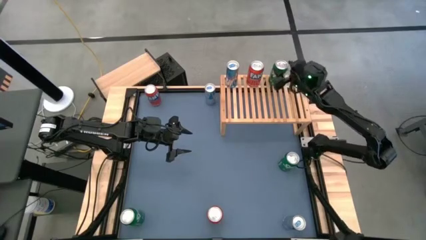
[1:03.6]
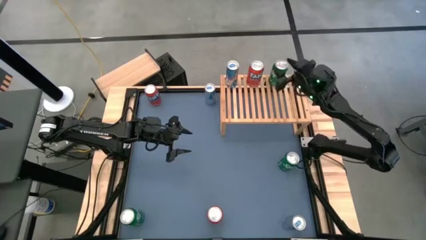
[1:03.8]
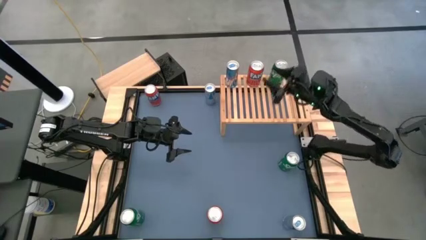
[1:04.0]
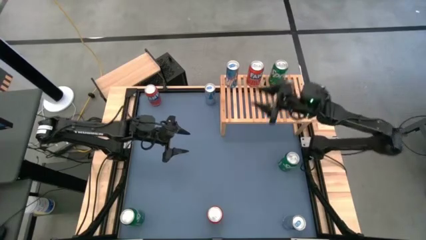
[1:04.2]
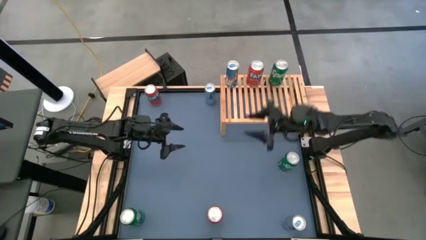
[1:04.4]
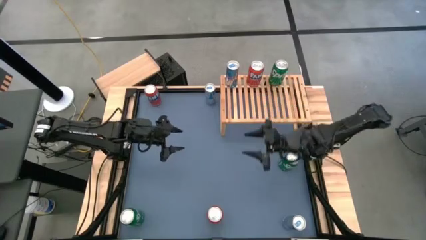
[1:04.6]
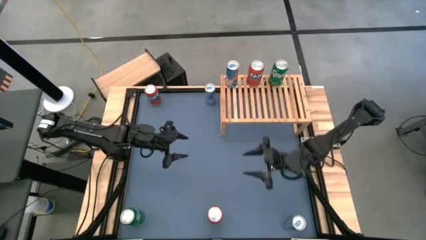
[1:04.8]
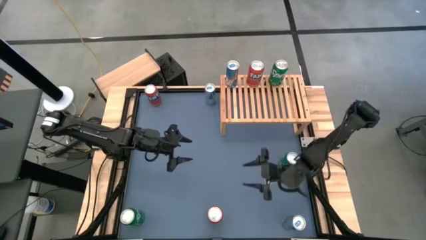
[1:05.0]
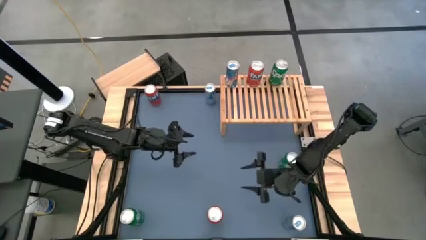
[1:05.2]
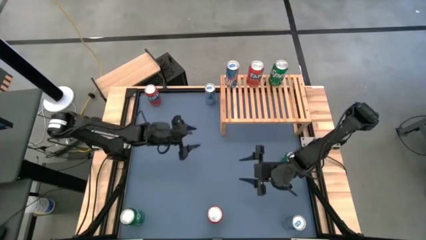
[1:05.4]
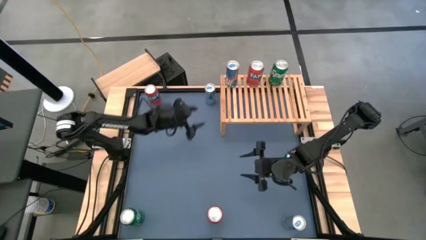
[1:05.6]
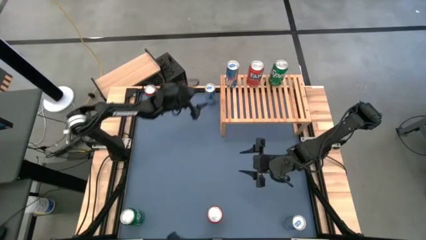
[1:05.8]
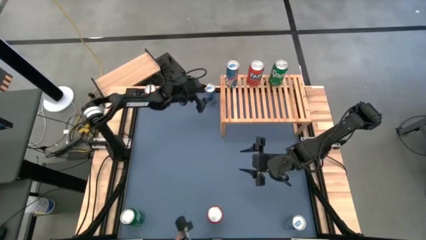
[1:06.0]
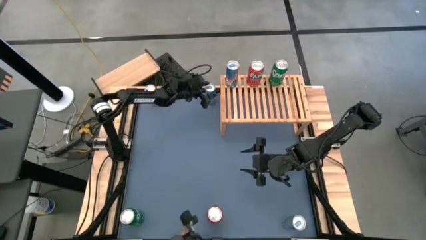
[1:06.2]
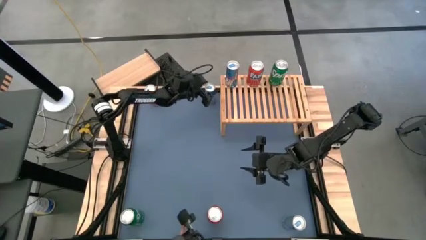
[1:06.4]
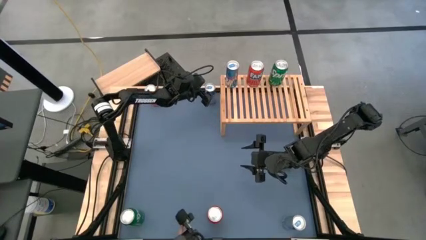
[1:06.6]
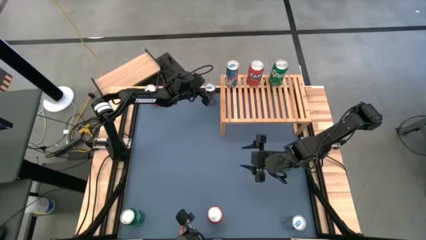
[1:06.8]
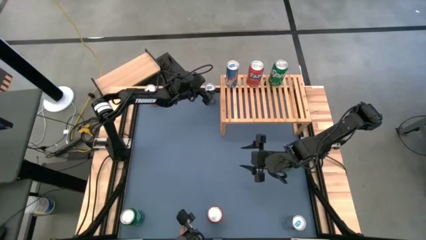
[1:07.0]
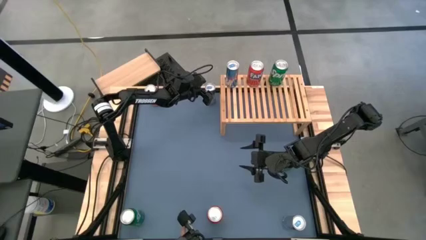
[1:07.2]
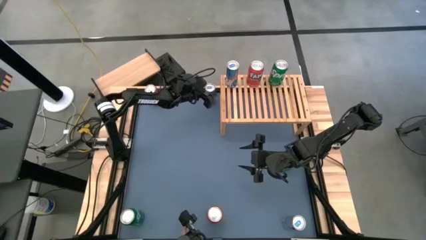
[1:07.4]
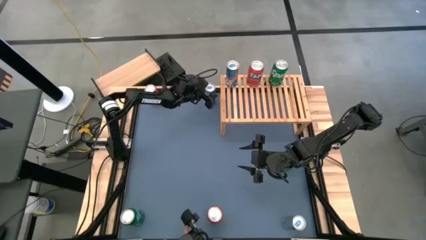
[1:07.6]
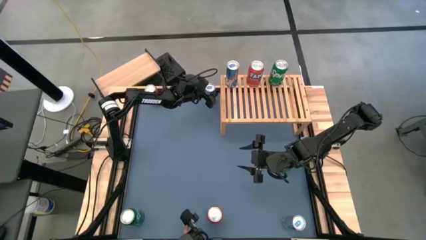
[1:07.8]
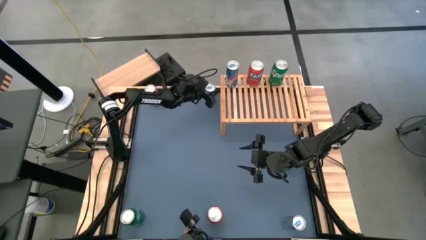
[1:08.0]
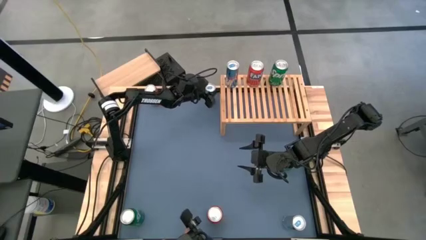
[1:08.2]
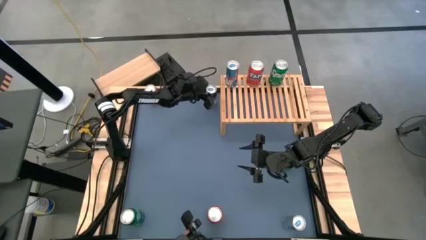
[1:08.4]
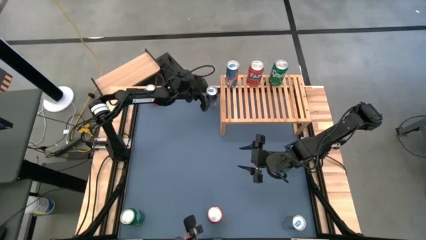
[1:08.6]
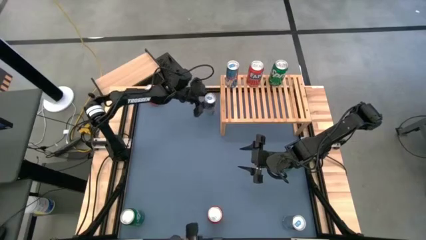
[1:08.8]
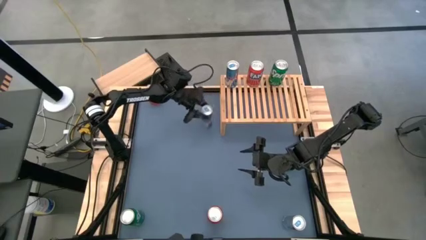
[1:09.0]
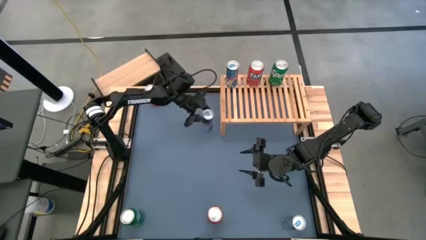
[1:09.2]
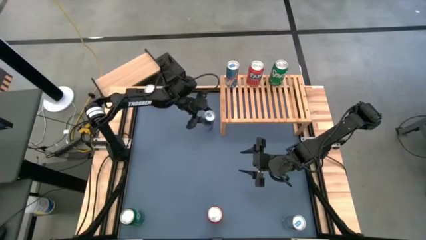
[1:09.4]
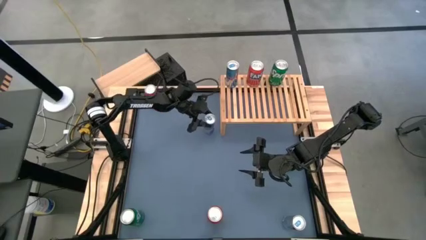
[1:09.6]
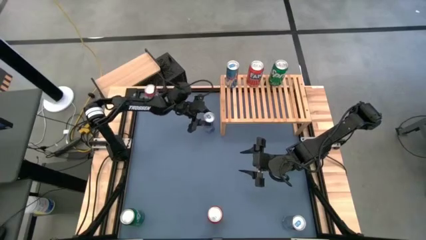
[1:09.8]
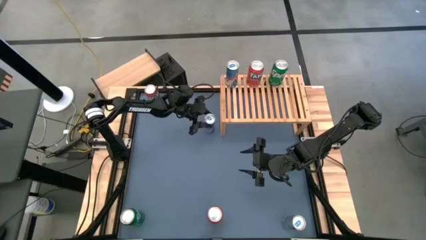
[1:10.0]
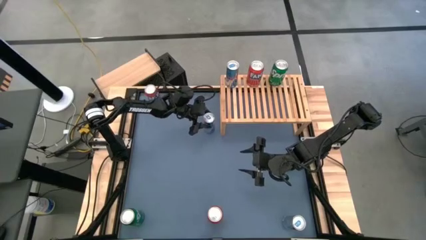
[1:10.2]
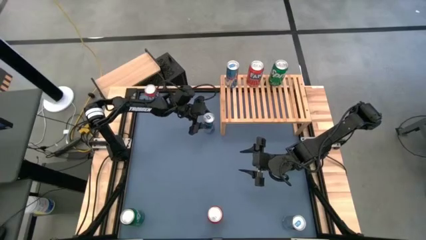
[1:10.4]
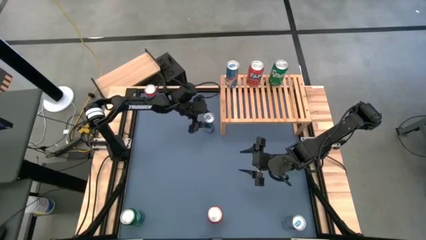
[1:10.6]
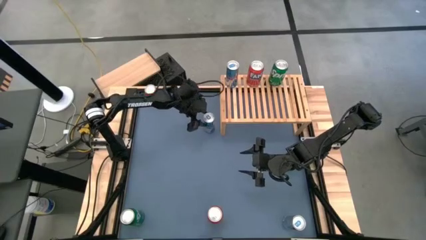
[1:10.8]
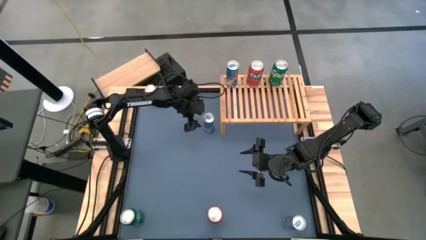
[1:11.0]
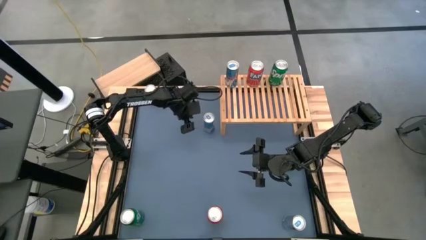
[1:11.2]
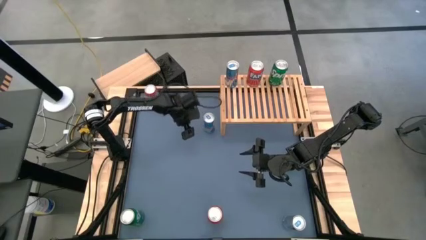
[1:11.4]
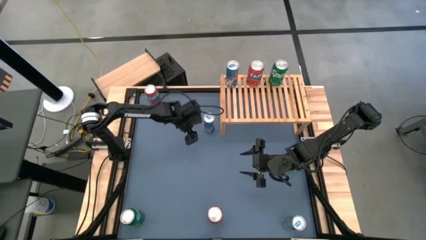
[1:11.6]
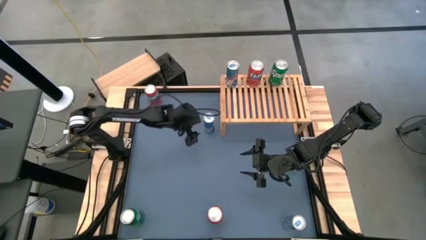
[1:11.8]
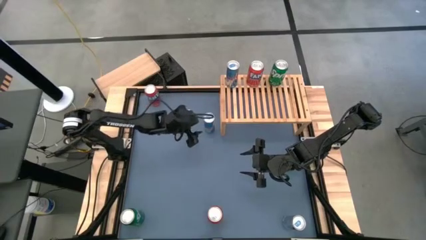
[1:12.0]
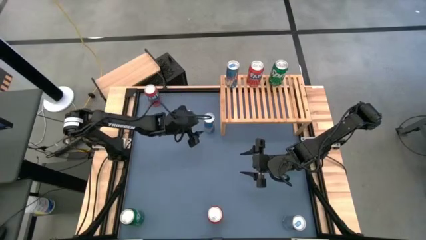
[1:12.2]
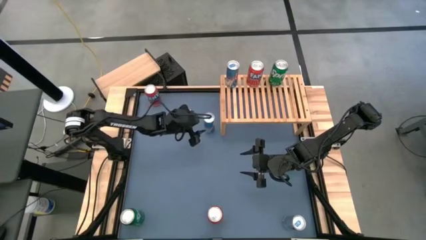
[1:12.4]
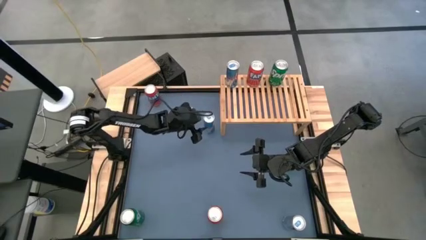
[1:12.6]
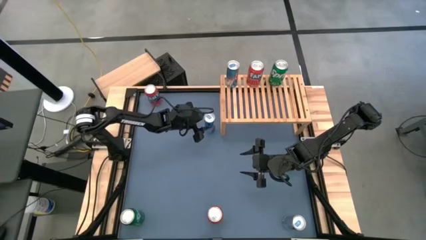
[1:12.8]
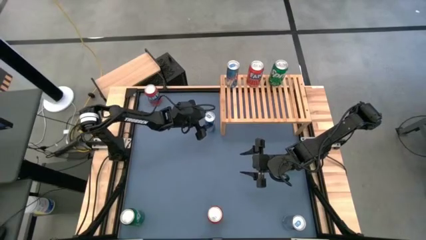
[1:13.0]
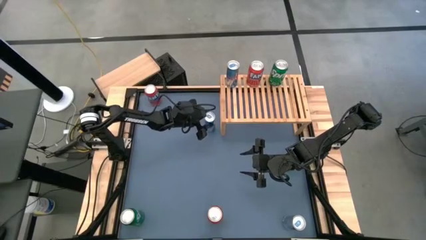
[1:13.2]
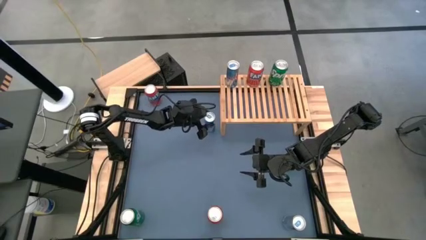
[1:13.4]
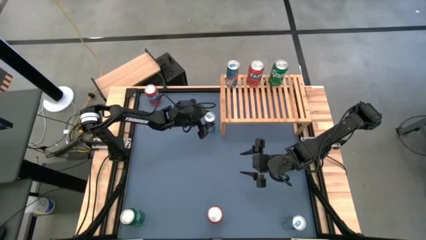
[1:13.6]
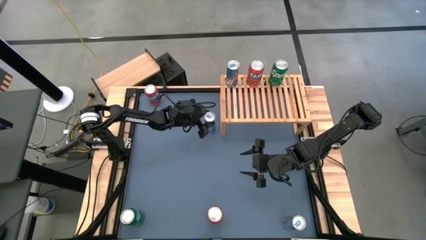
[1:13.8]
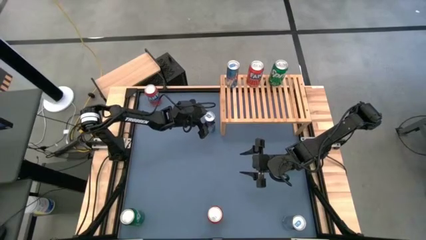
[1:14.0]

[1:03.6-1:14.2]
Task: Place canned beverage on shelf
Put the top blue soda can on the shelf aligned with the other blue soda can
